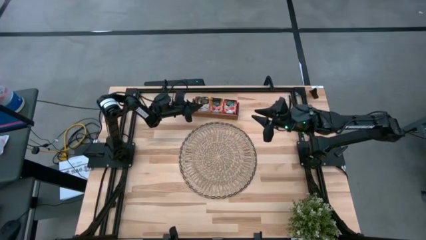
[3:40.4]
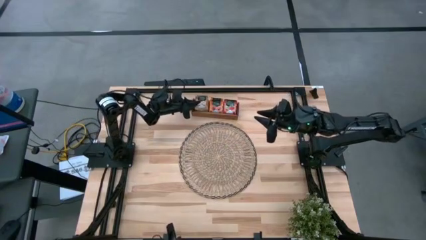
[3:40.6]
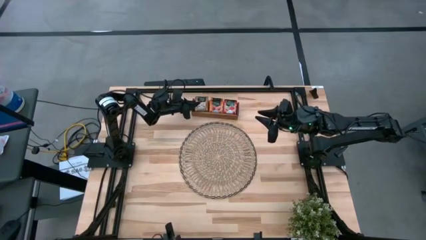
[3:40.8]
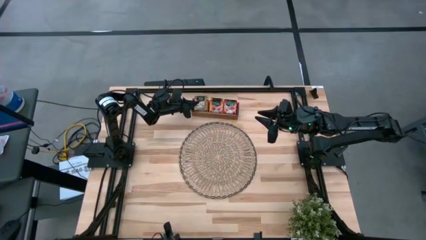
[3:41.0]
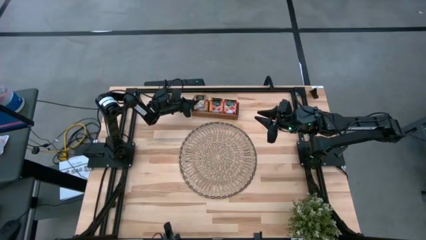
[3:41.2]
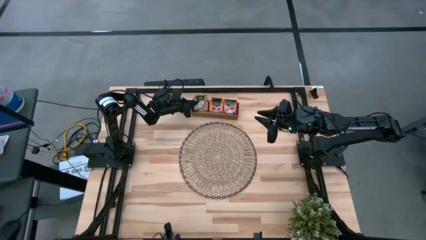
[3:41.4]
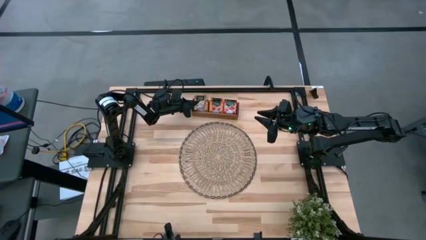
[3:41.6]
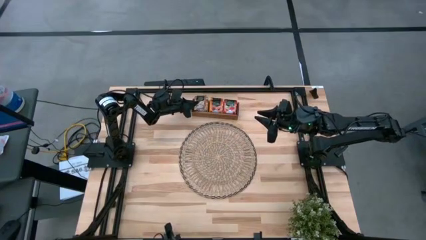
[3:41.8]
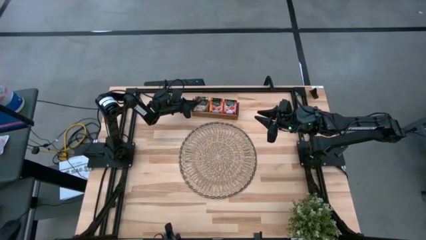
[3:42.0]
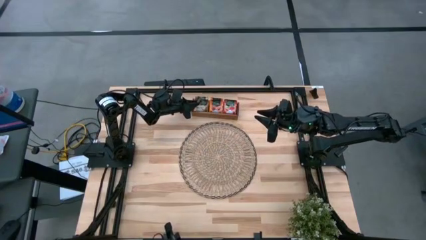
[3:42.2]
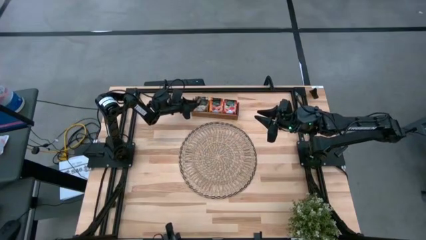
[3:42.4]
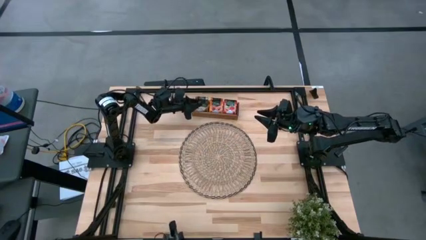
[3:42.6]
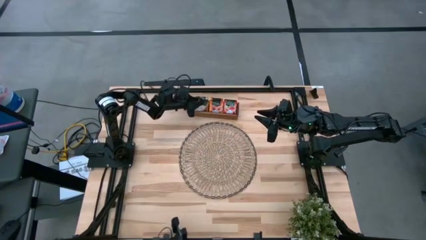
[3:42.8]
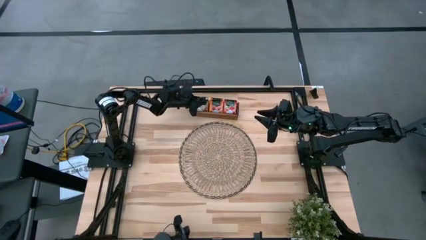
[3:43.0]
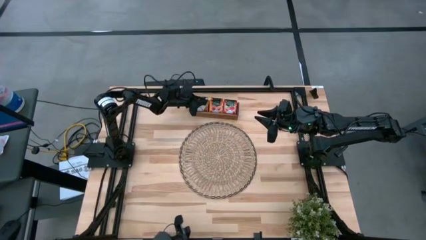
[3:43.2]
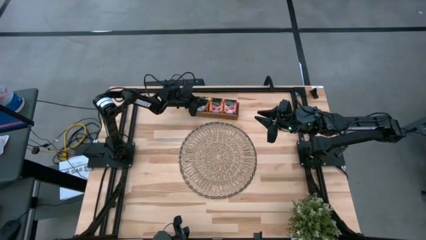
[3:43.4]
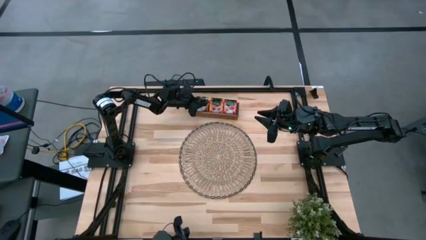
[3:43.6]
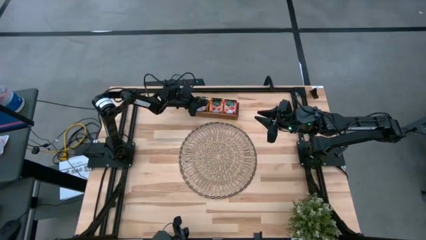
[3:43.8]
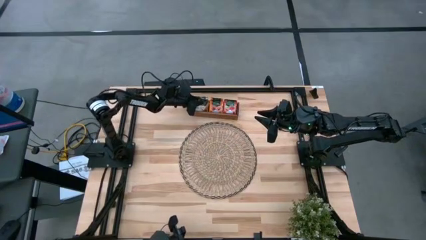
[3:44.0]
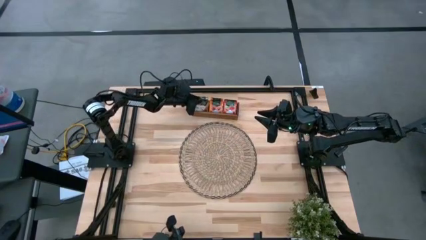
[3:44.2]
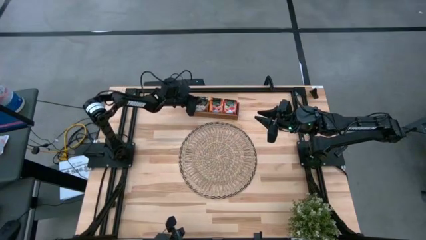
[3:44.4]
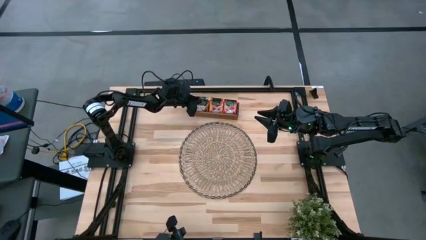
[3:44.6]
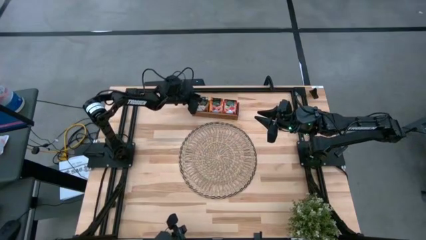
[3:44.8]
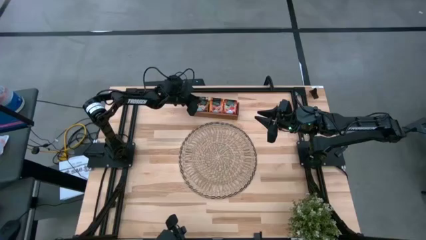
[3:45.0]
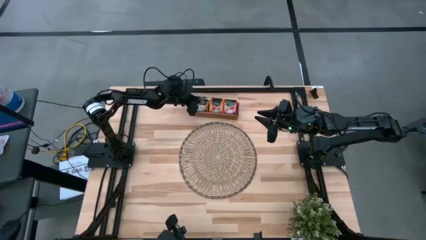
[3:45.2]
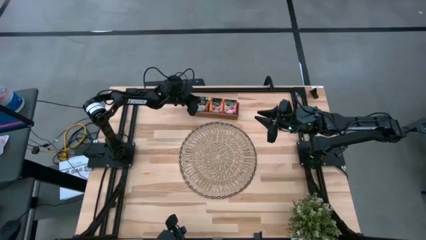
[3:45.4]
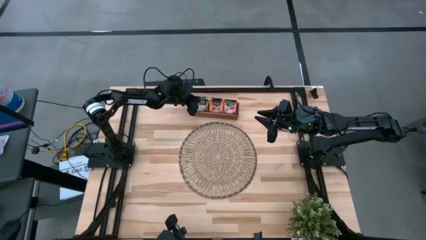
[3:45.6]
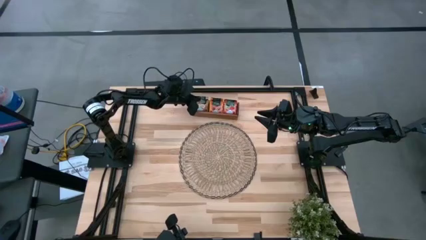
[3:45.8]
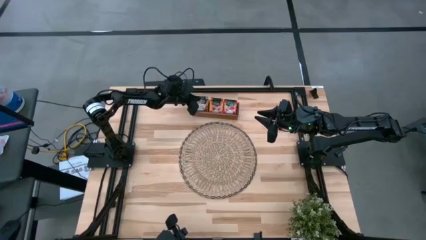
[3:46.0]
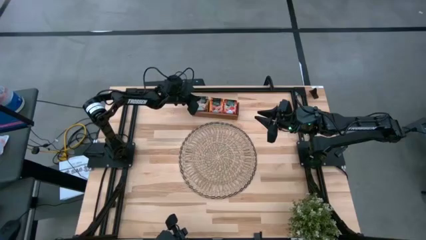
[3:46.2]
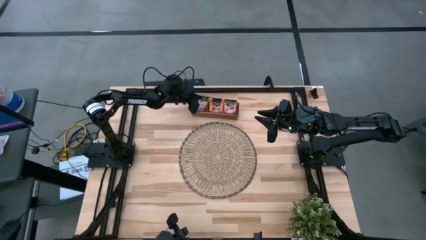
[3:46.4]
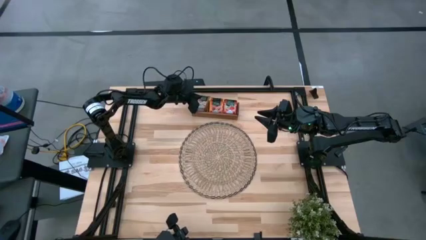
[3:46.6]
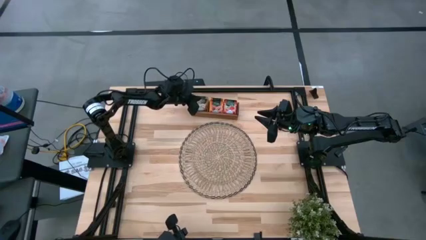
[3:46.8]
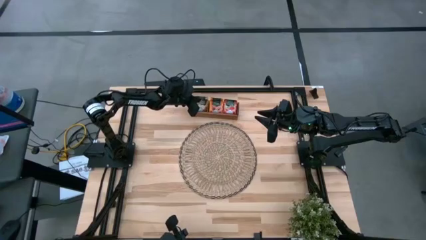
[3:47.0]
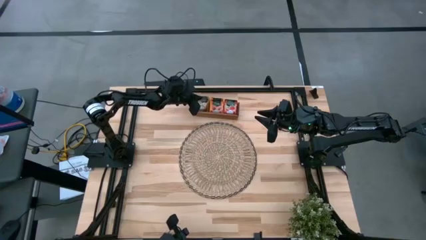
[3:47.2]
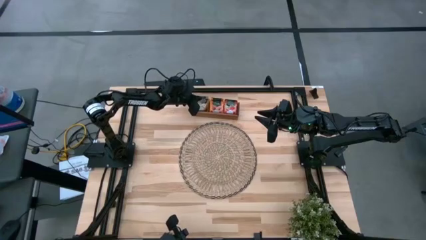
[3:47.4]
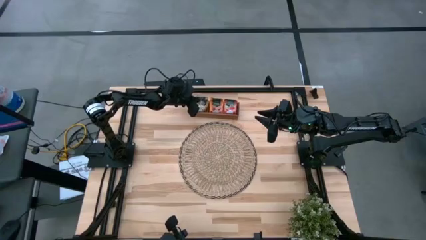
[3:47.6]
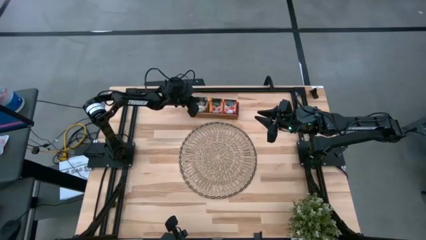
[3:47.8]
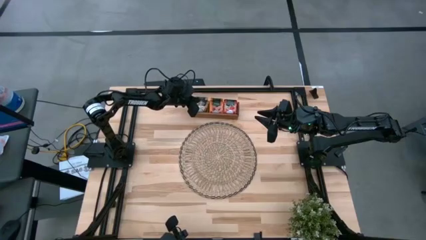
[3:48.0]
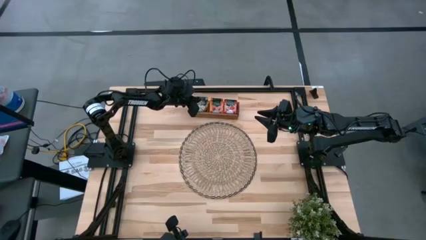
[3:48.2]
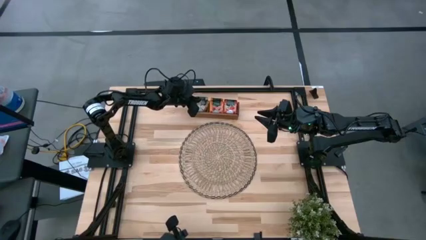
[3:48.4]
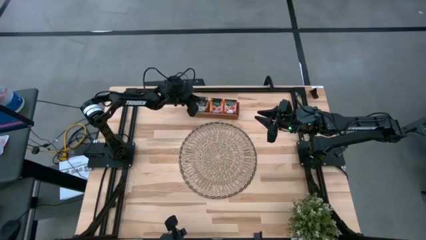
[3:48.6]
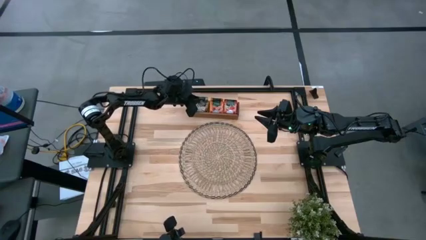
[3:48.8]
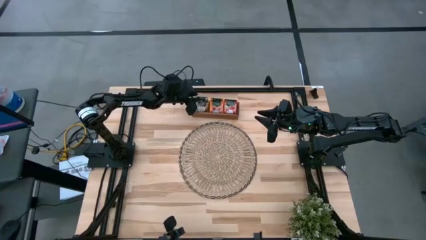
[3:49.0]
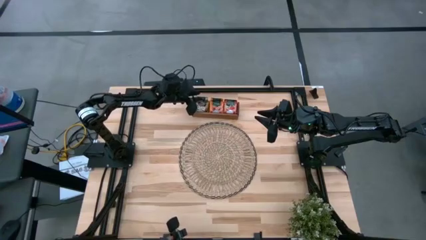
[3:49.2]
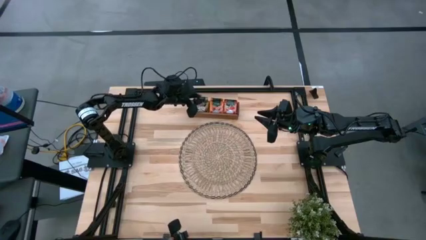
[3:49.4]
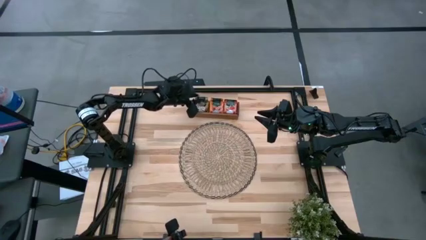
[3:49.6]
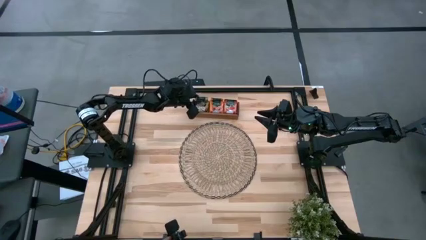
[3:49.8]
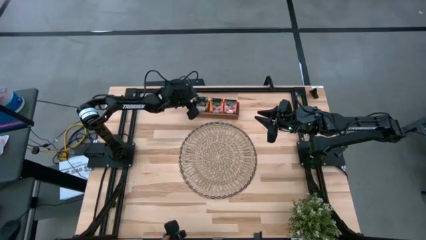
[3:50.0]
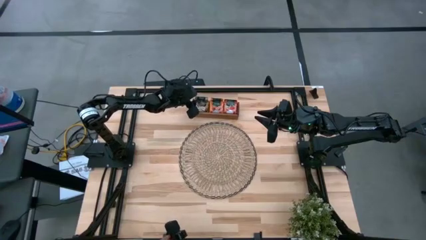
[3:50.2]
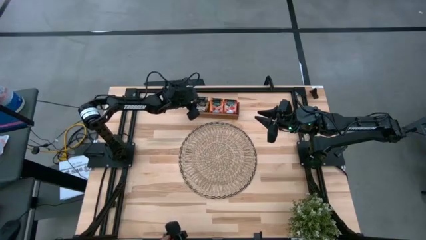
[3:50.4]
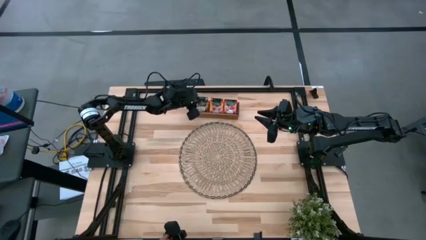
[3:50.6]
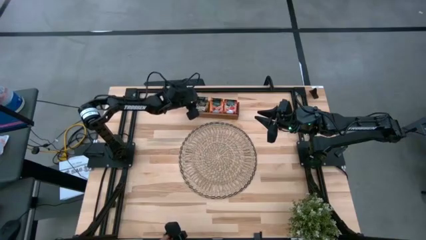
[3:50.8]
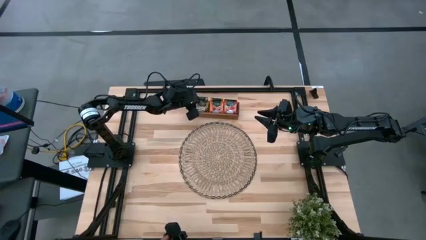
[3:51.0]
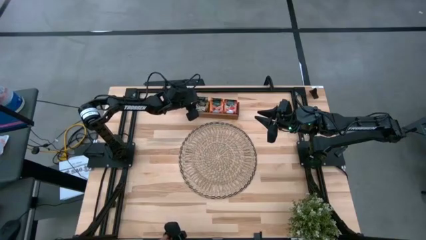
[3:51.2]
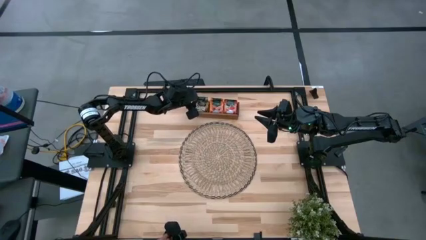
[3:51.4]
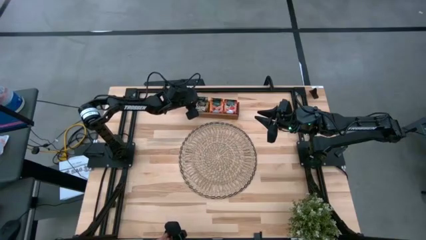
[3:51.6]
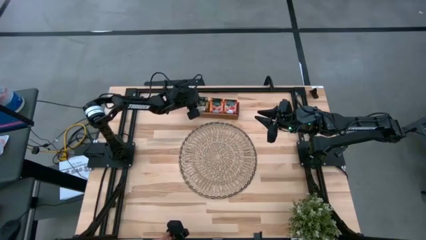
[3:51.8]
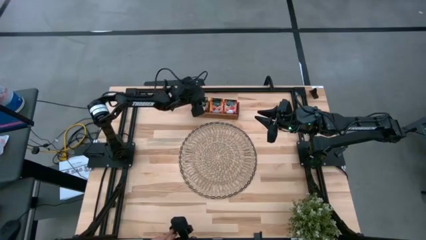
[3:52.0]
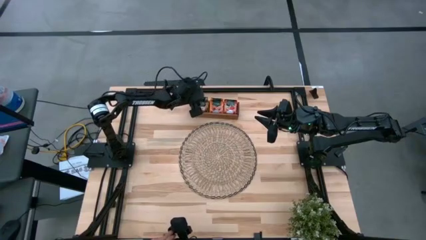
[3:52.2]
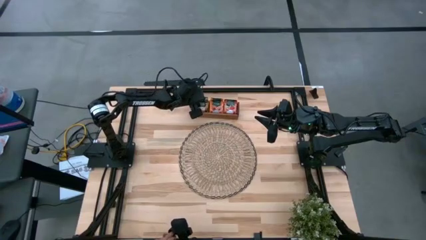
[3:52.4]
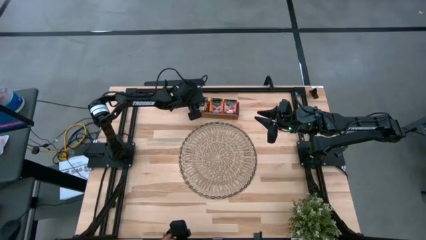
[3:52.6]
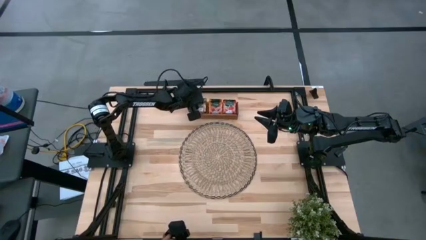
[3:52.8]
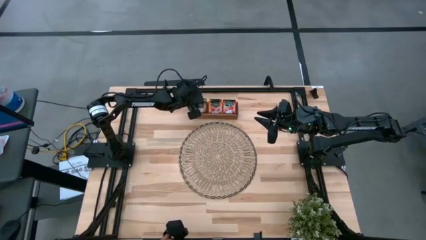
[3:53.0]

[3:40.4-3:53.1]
Task: Pick & Place Tea
Put the brown tea bag into the left section of the wooden organizer

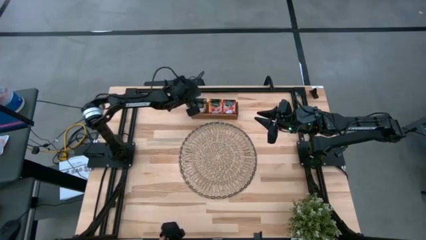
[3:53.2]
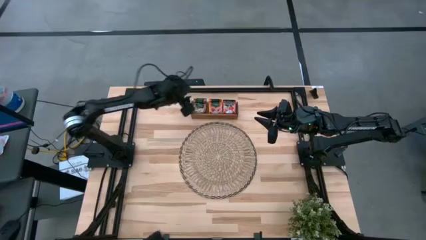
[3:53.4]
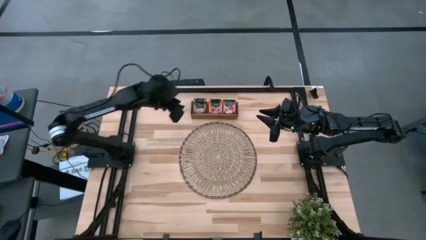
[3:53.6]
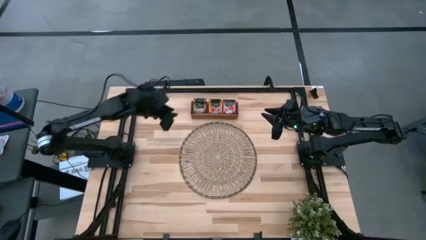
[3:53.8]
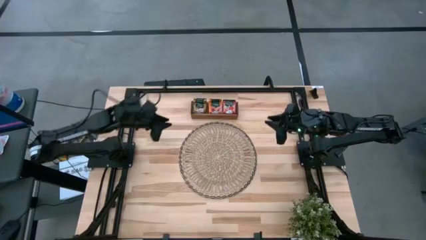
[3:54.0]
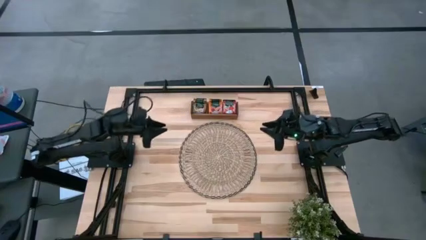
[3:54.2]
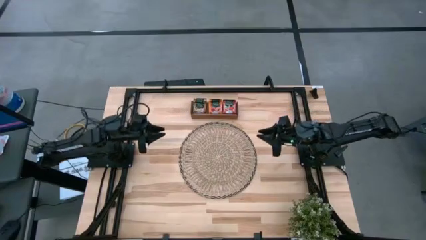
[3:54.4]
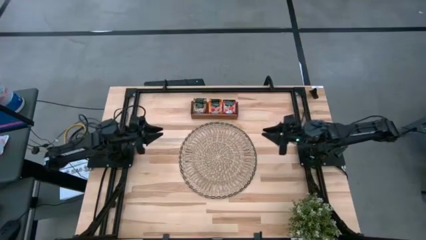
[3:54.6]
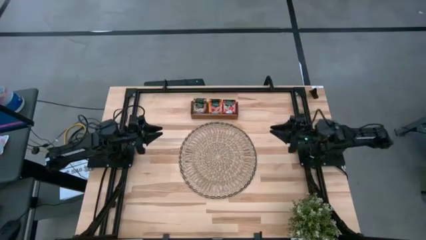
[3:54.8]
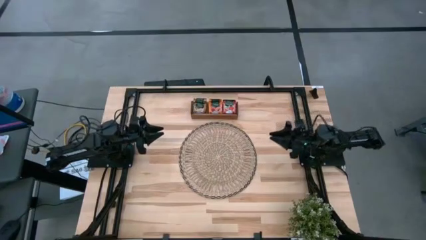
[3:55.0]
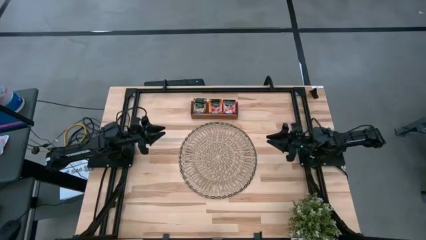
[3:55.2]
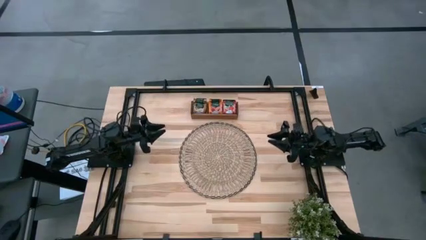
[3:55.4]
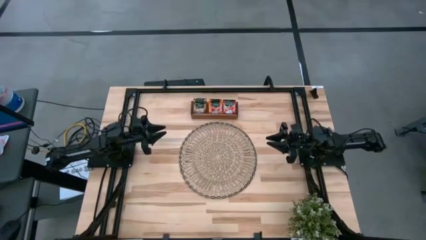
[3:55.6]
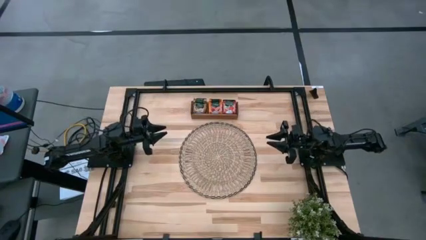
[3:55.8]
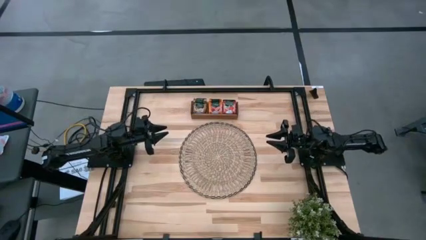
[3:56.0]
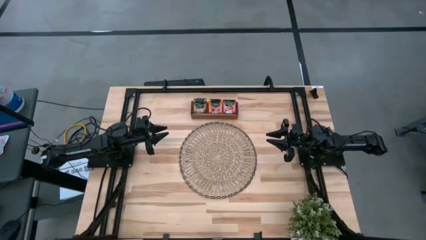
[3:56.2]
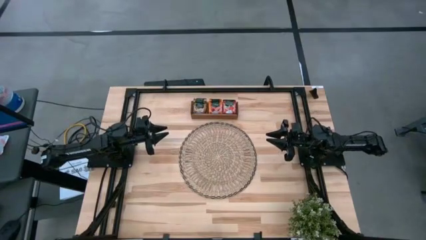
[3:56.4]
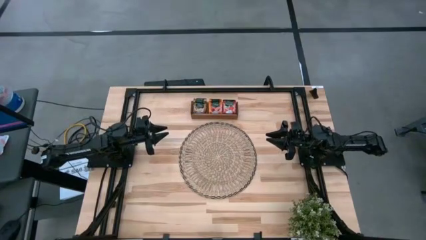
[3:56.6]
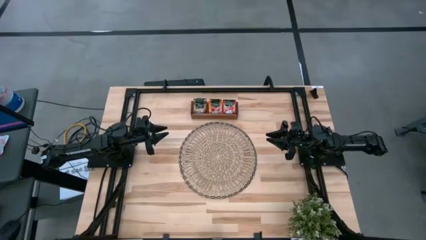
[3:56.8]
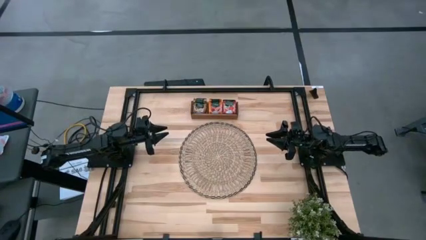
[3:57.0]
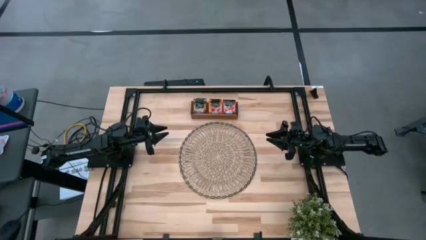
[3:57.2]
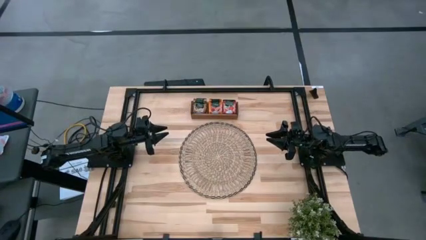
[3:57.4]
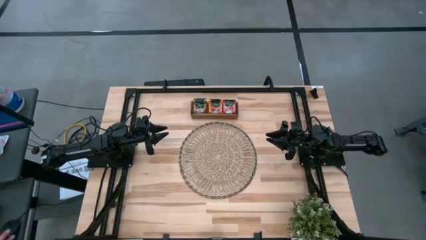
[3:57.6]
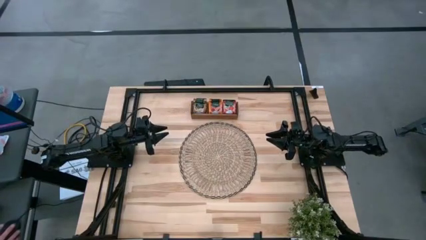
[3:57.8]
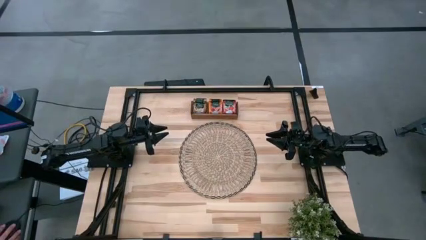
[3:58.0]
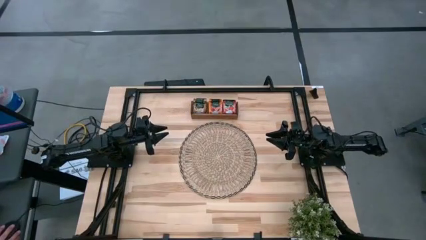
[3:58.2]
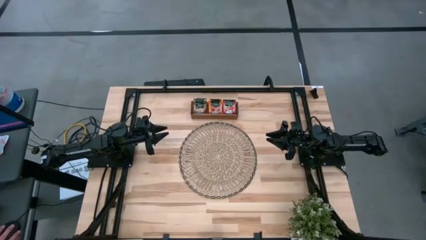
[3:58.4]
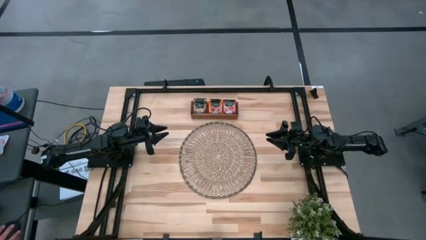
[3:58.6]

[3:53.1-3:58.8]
Return to Home Position
